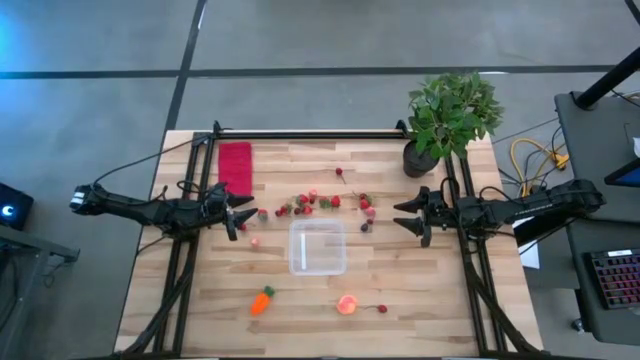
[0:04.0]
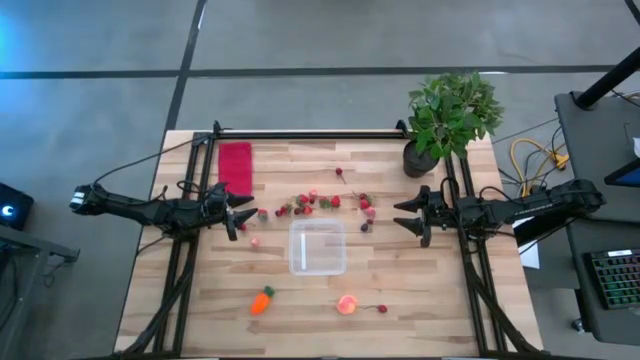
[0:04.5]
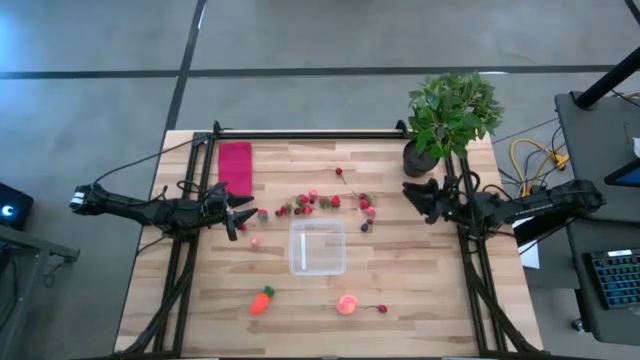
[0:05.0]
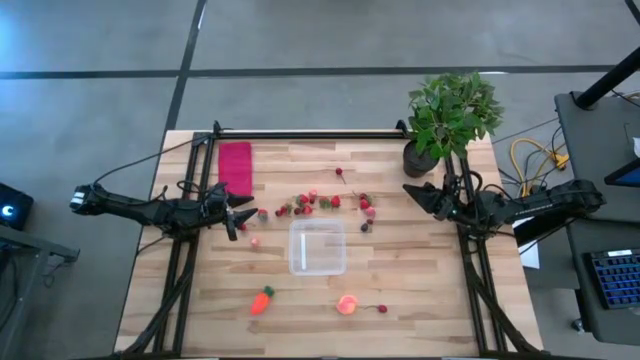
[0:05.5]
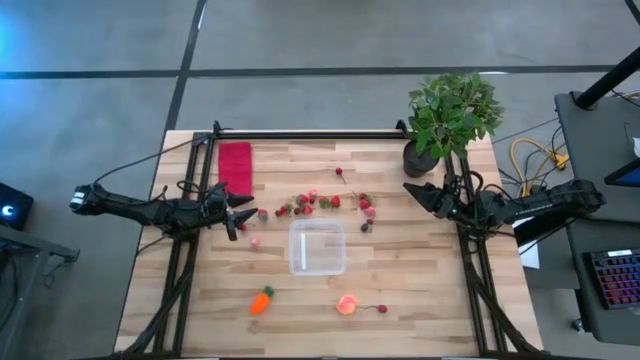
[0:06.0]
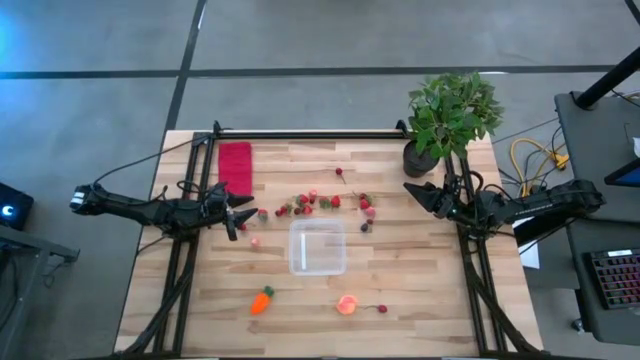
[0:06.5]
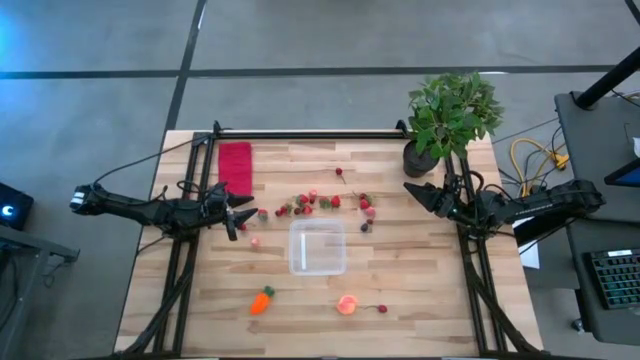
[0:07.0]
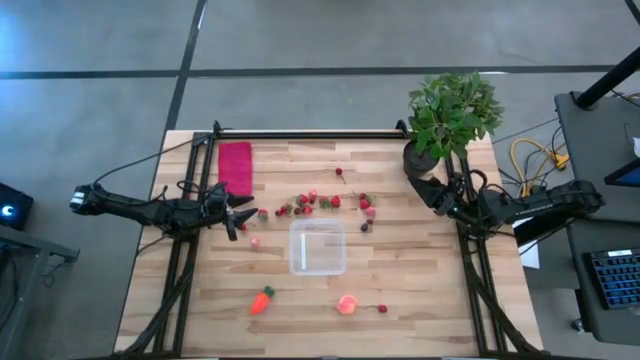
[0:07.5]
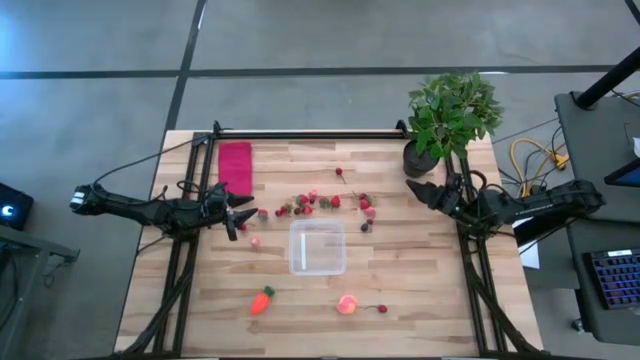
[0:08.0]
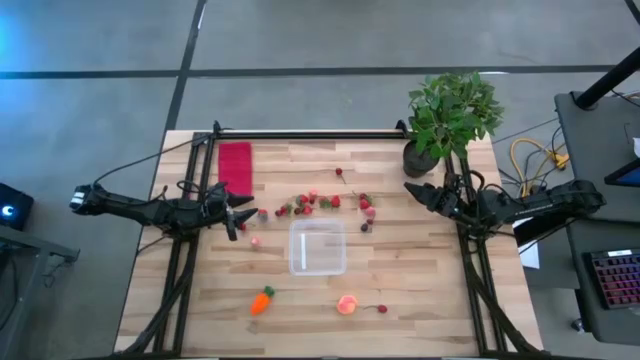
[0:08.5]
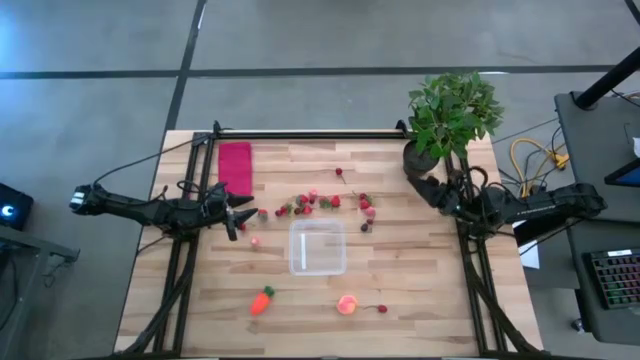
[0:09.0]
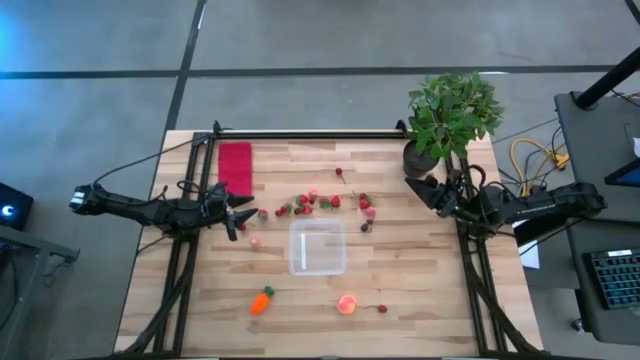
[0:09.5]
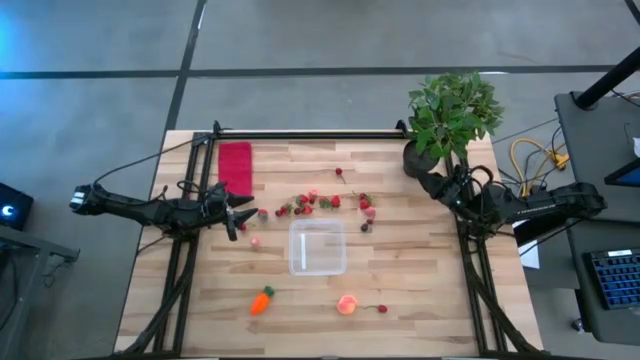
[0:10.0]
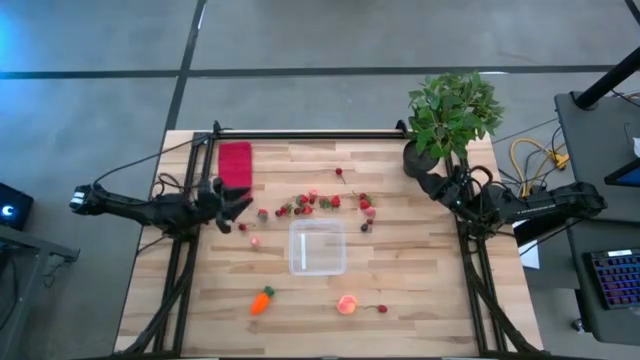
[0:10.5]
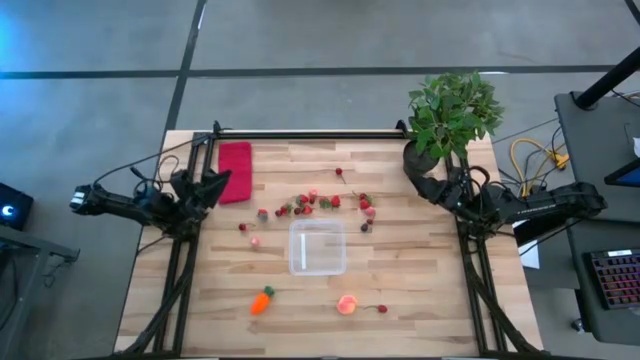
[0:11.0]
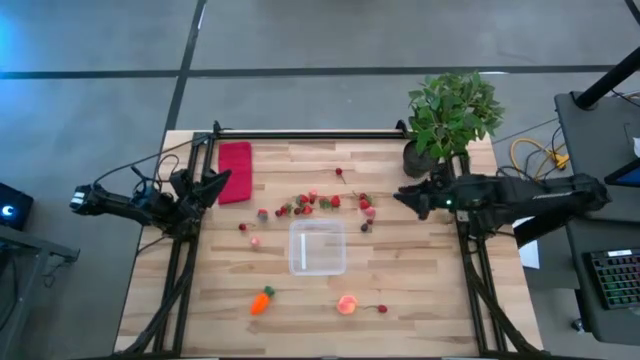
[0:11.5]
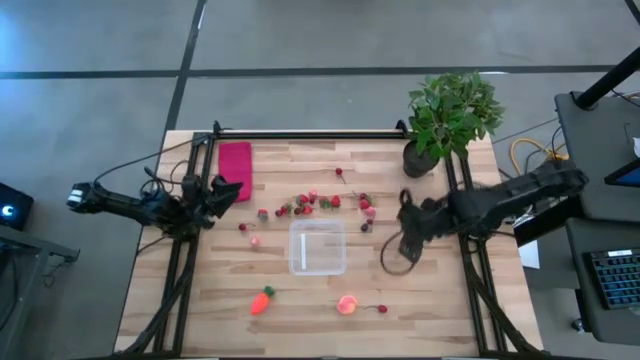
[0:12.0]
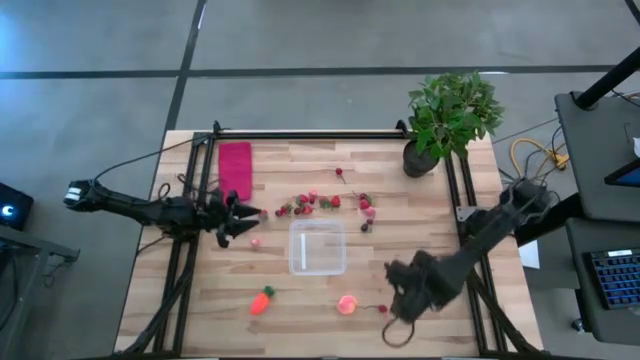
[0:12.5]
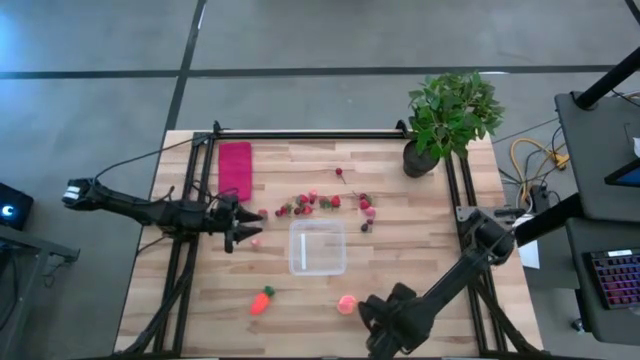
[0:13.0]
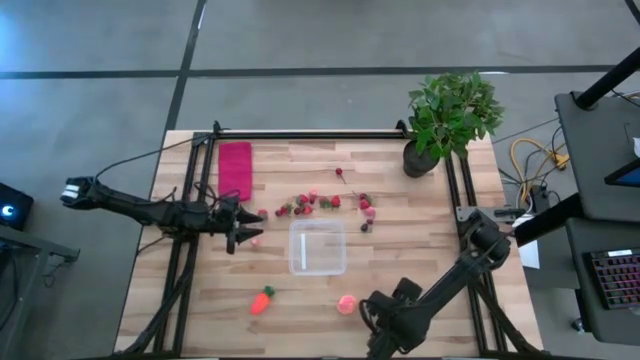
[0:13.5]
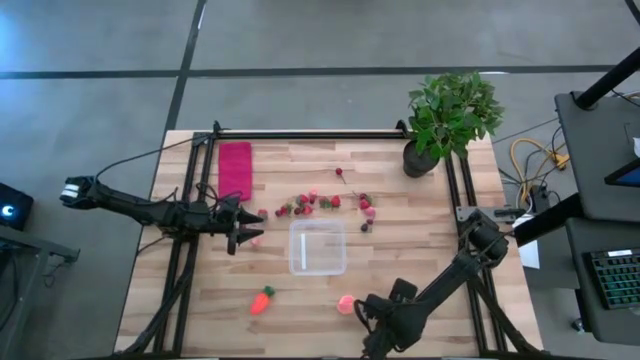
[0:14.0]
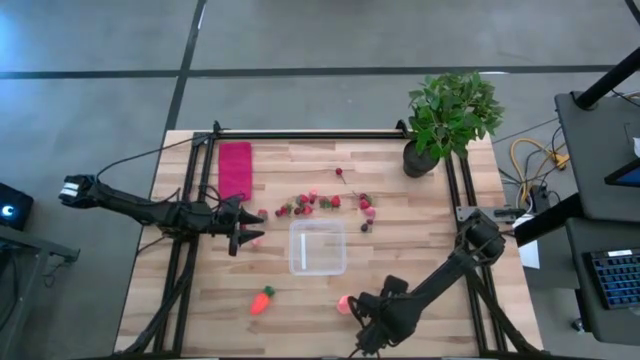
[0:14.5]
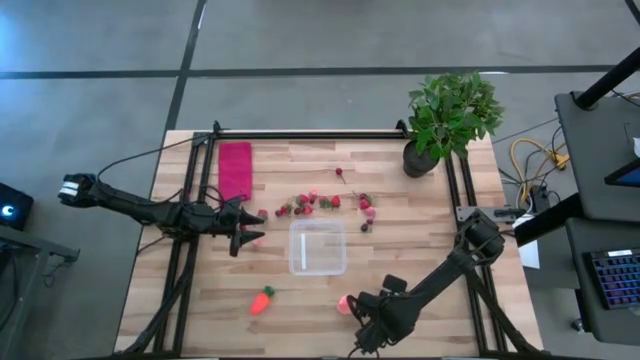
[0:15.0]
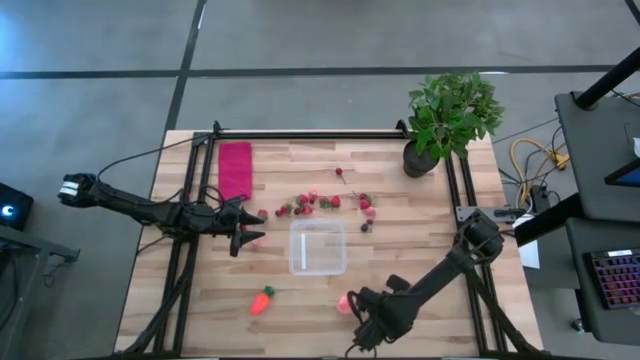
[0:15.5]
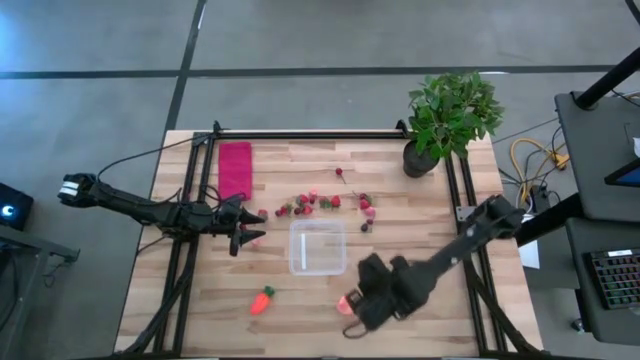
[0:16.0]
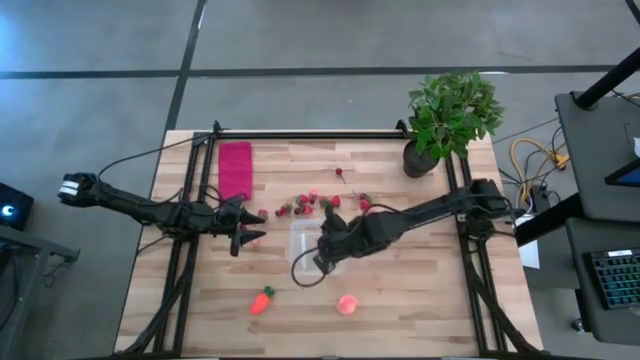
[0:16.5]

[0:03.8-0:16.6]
Task: Pick and placing Produce into tupperware
Put the red cherry into the transparent bin

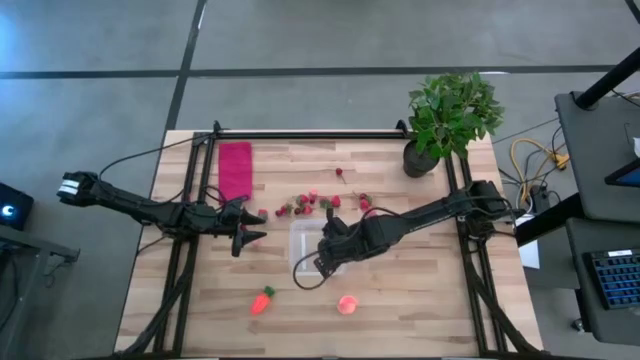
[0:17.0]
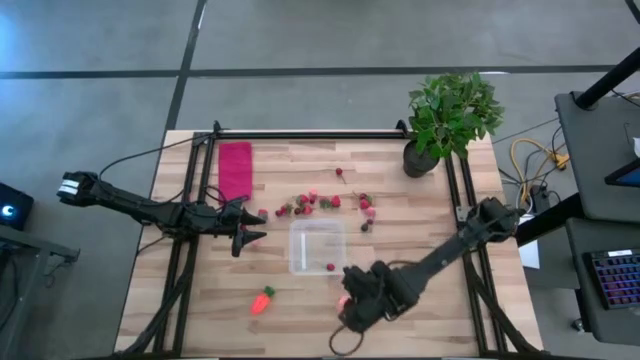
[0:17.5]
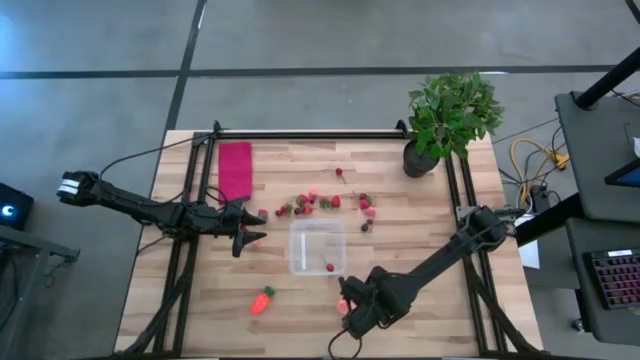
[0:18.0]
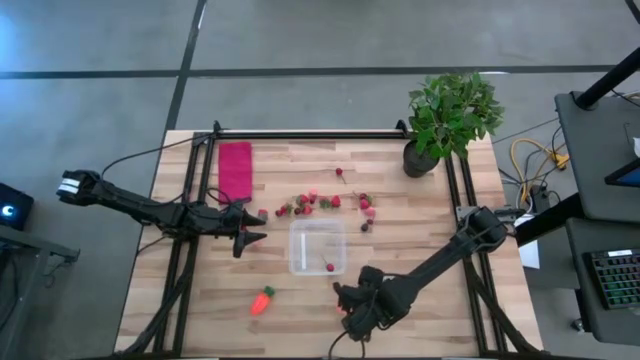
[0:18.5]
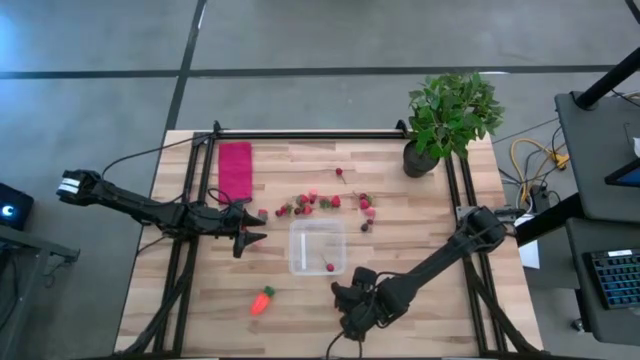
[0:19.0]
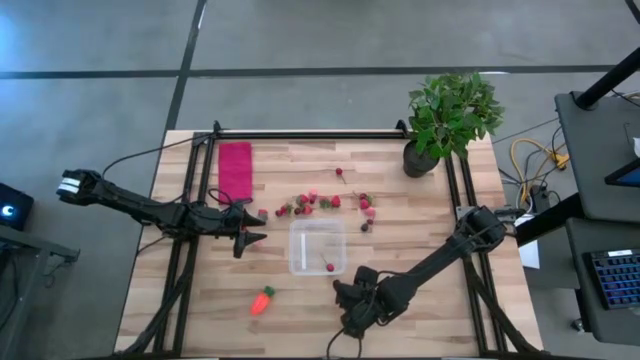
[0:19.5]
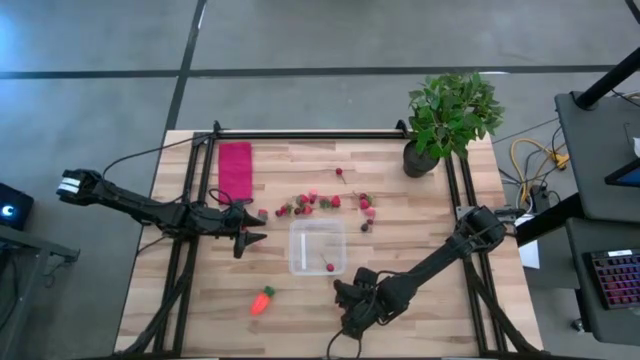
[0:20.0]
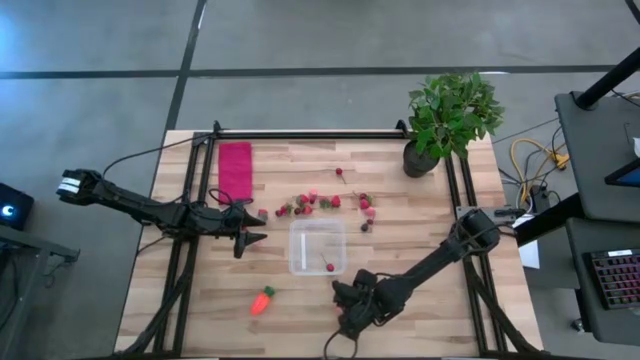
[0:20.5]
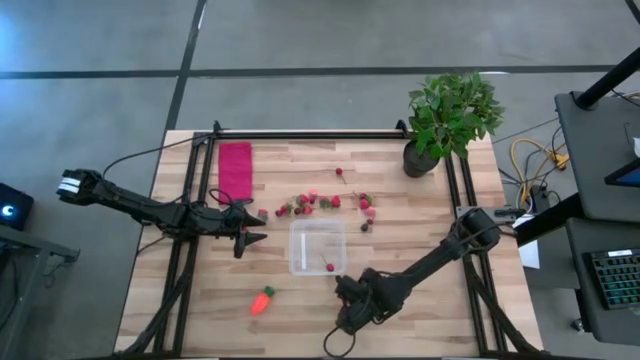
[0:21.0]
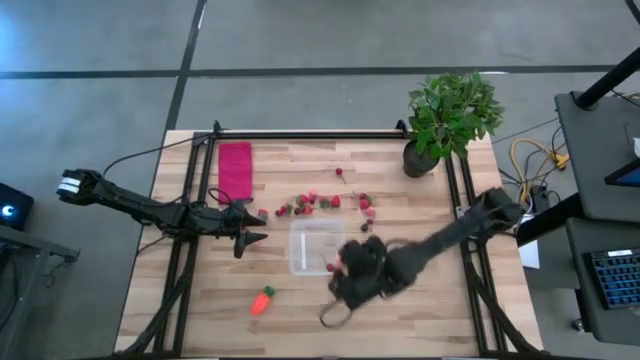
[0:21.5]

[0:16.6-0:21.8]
Put the pink peach into the transparent bin

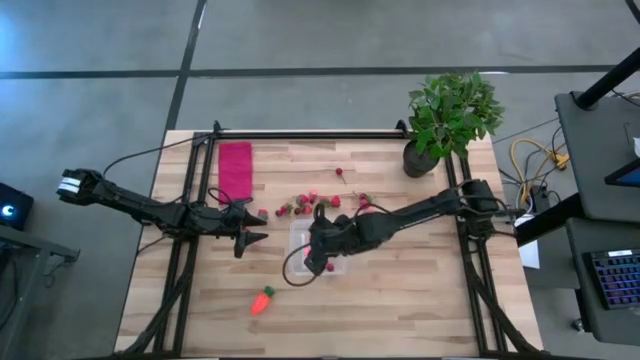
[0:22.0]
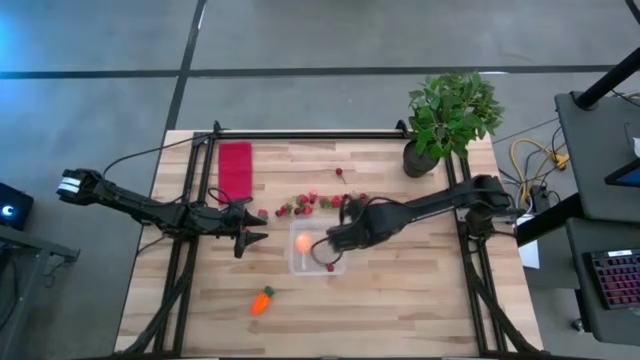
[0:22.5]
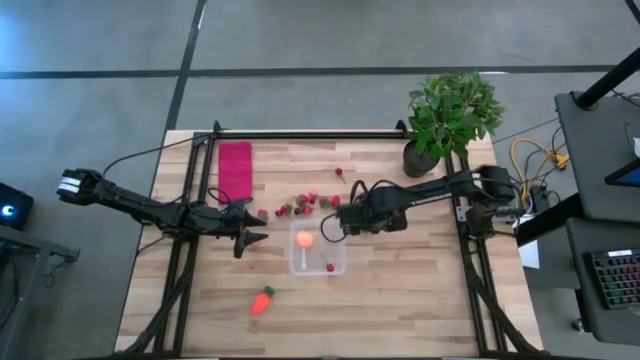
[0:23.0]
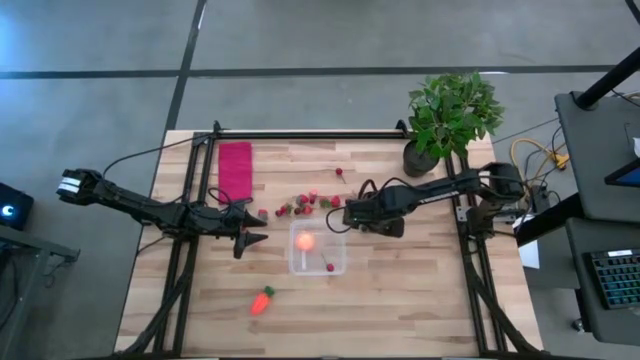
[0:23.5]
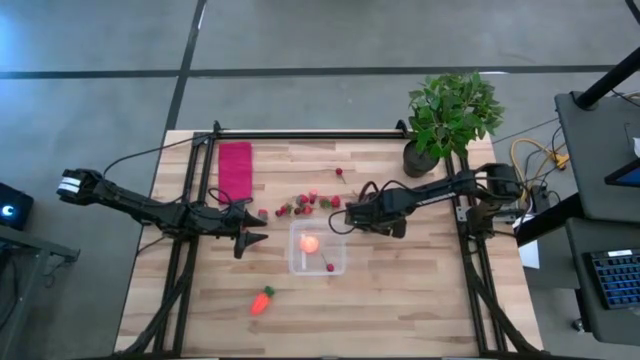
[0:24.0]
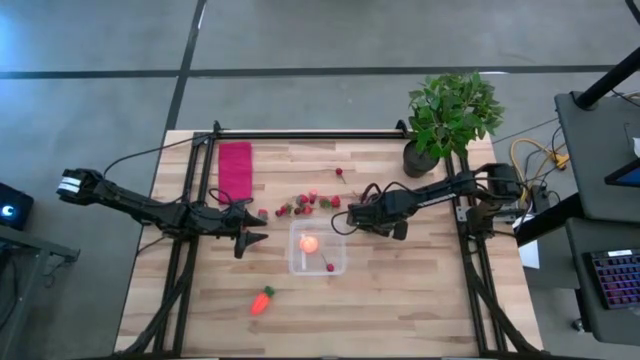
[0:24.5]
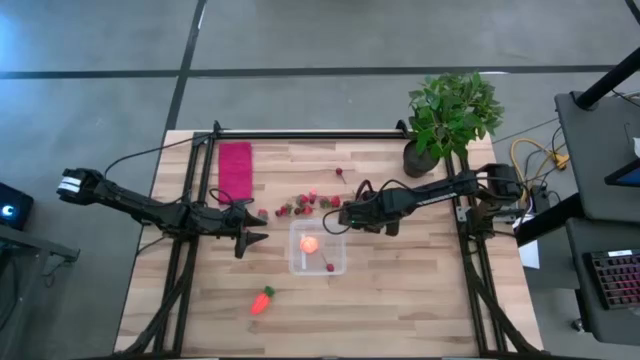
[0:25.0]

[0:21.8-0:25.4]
Put the blackberry into the transparent bin
